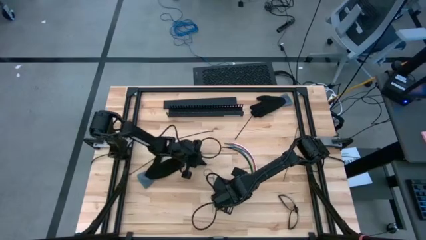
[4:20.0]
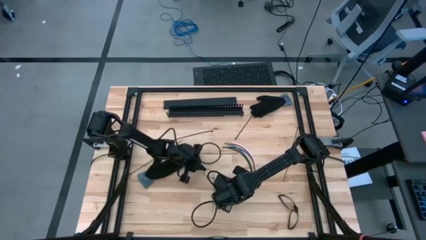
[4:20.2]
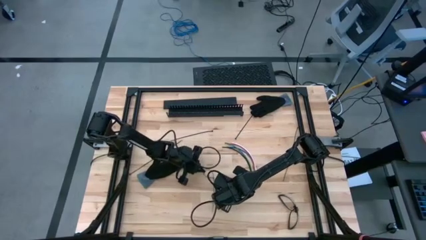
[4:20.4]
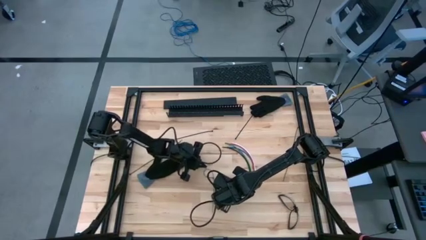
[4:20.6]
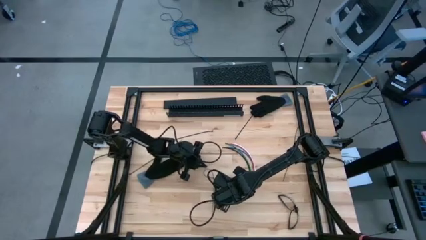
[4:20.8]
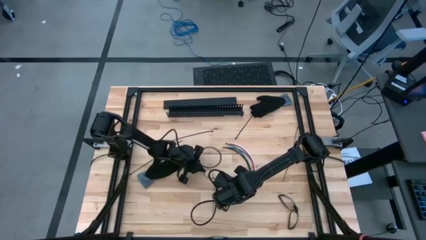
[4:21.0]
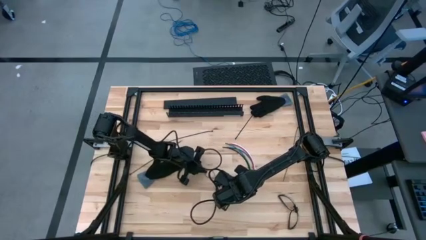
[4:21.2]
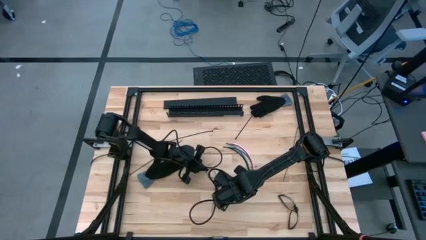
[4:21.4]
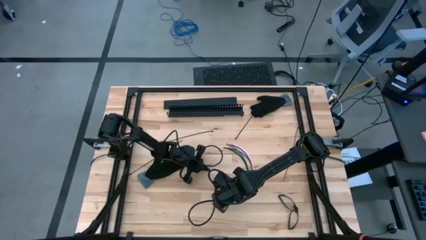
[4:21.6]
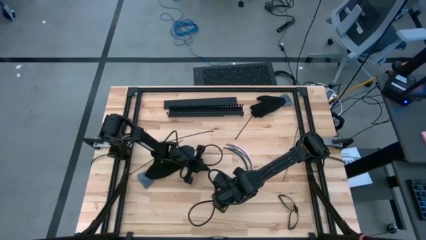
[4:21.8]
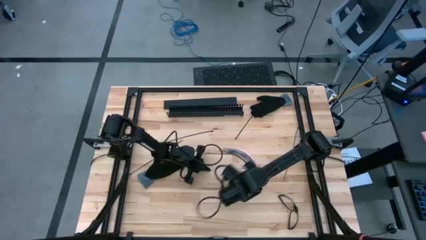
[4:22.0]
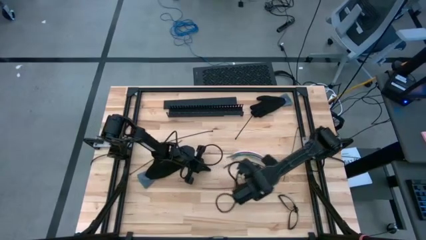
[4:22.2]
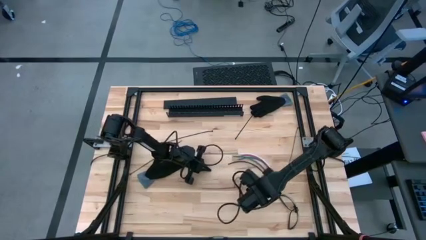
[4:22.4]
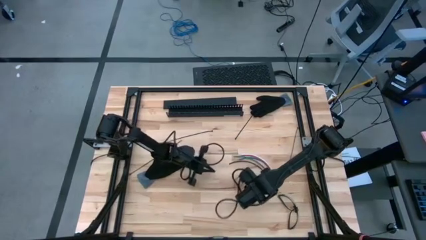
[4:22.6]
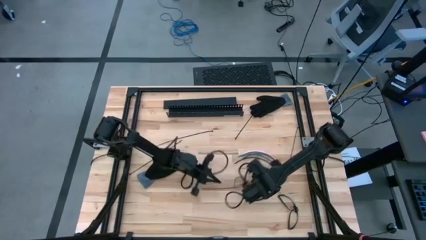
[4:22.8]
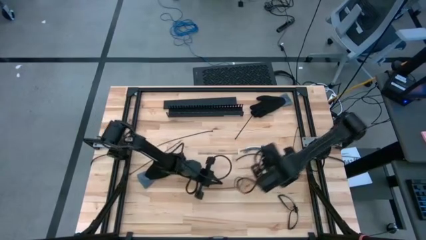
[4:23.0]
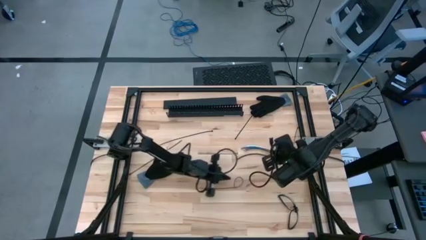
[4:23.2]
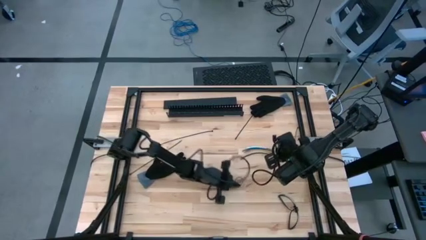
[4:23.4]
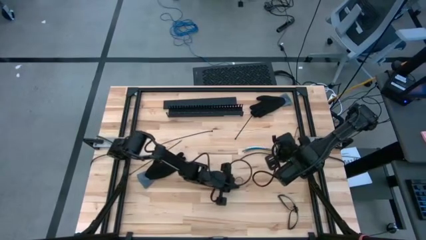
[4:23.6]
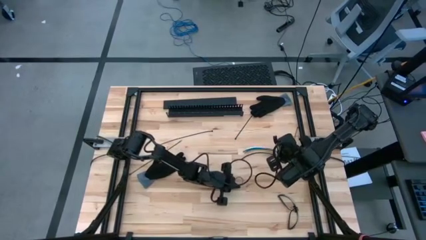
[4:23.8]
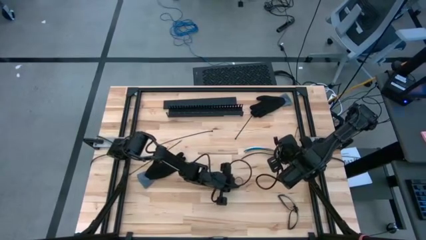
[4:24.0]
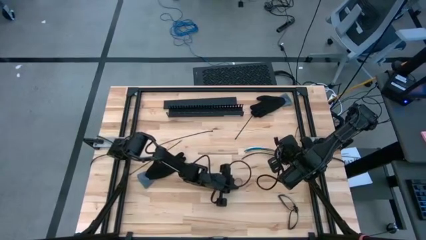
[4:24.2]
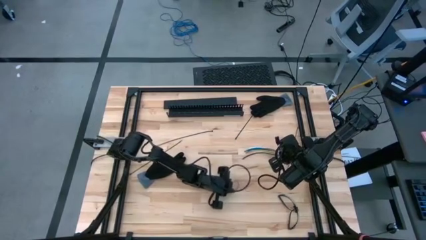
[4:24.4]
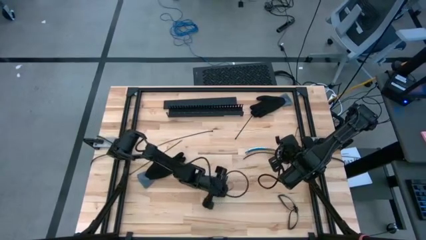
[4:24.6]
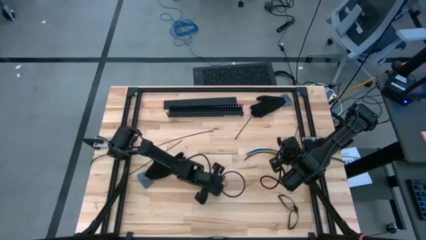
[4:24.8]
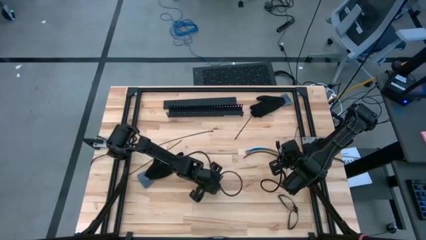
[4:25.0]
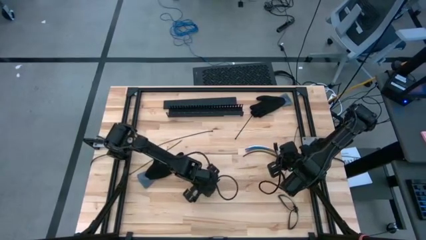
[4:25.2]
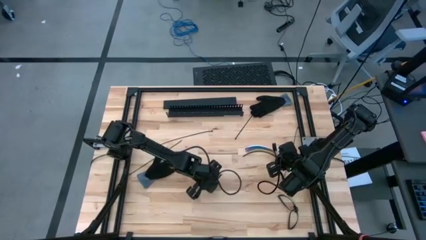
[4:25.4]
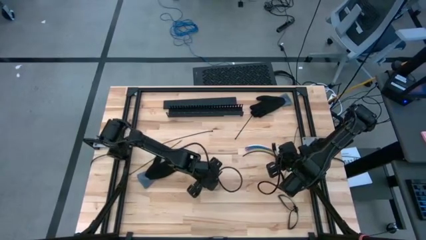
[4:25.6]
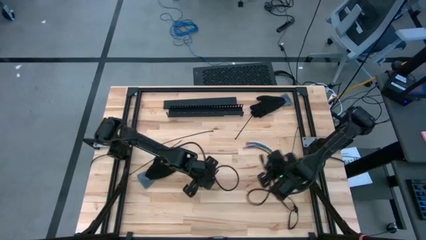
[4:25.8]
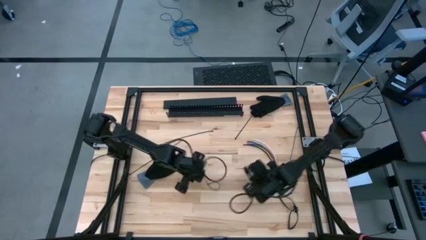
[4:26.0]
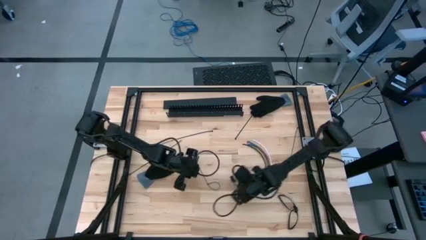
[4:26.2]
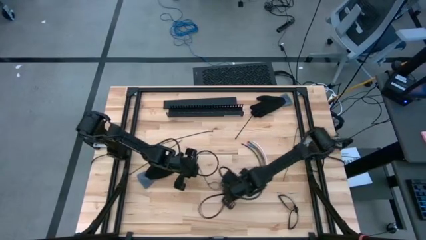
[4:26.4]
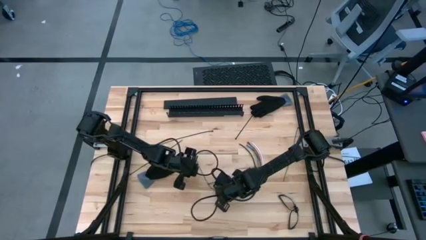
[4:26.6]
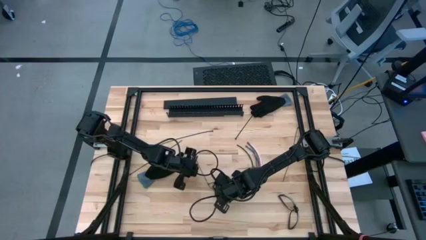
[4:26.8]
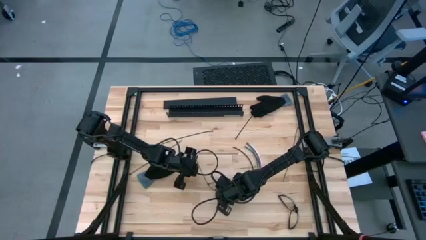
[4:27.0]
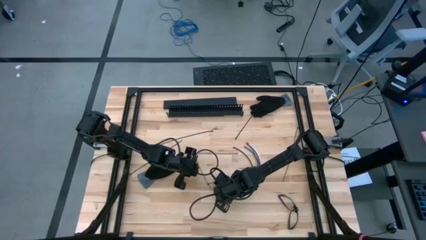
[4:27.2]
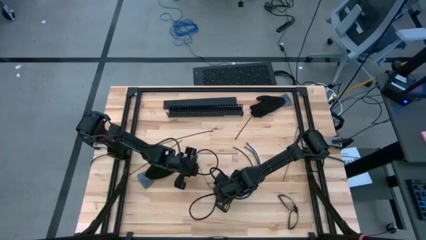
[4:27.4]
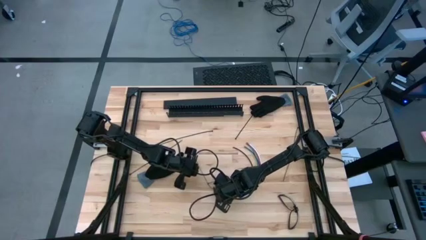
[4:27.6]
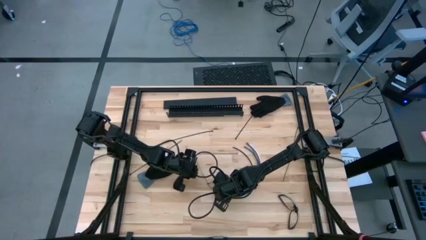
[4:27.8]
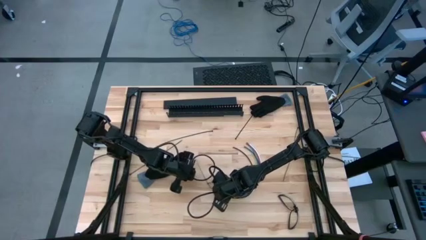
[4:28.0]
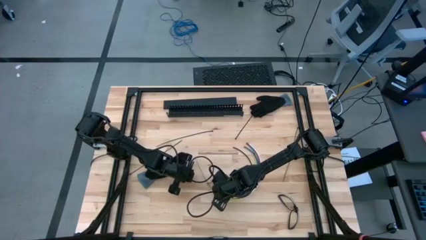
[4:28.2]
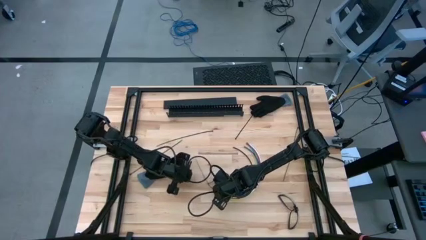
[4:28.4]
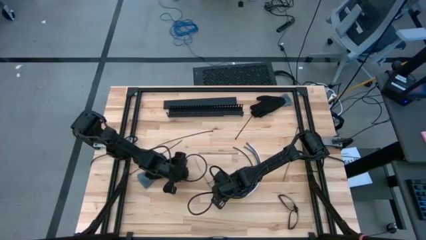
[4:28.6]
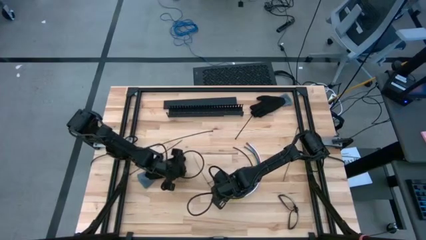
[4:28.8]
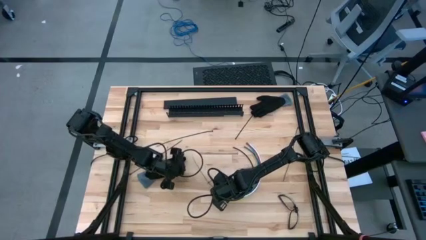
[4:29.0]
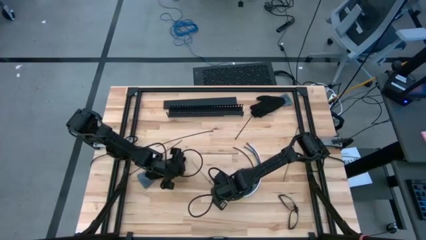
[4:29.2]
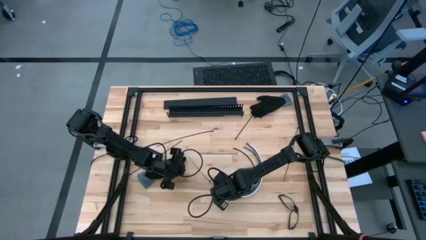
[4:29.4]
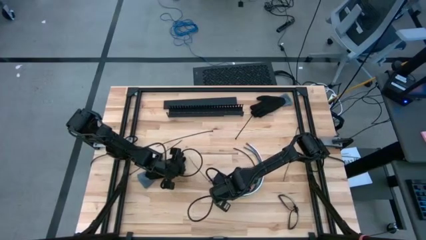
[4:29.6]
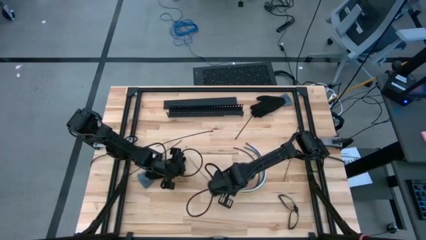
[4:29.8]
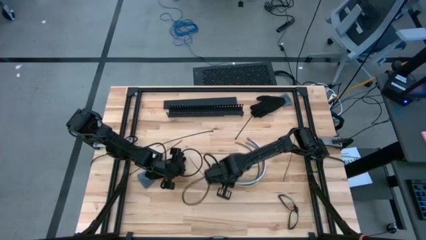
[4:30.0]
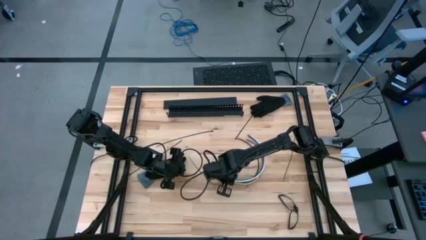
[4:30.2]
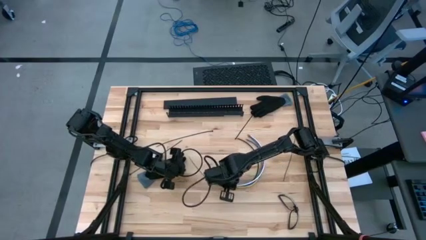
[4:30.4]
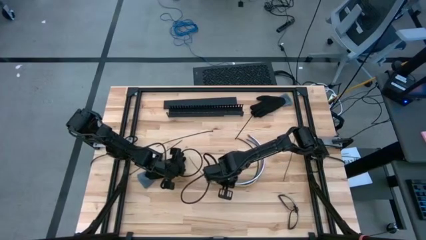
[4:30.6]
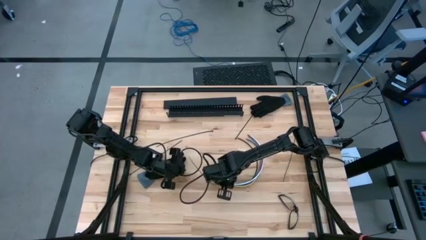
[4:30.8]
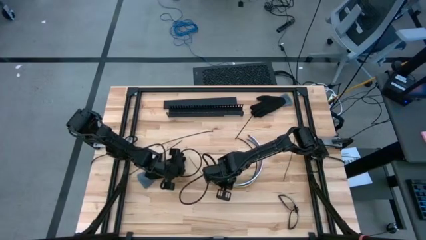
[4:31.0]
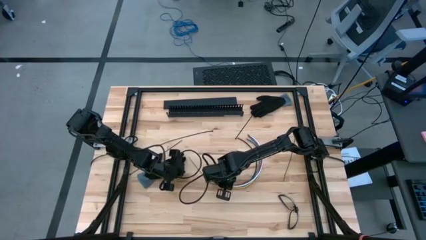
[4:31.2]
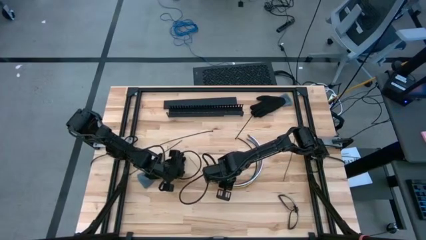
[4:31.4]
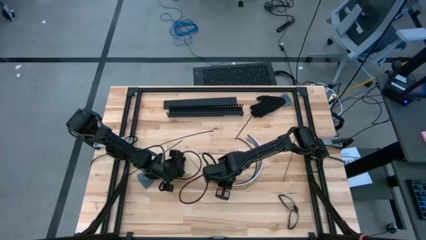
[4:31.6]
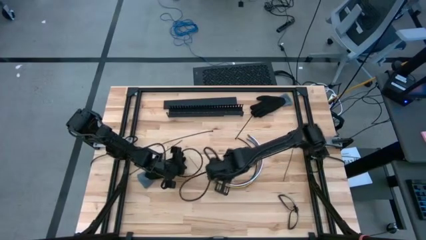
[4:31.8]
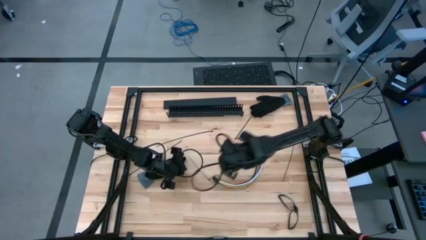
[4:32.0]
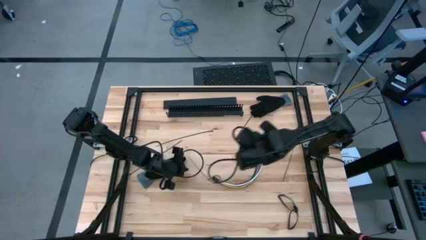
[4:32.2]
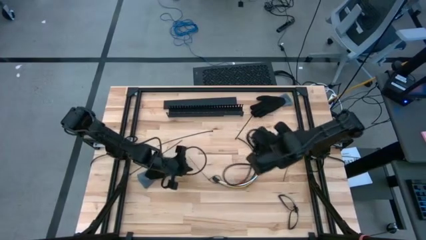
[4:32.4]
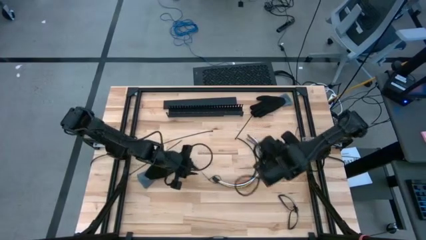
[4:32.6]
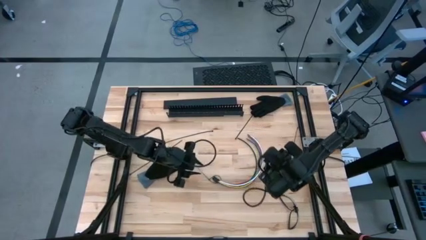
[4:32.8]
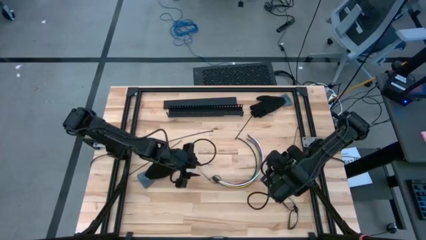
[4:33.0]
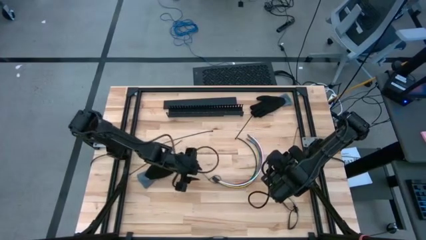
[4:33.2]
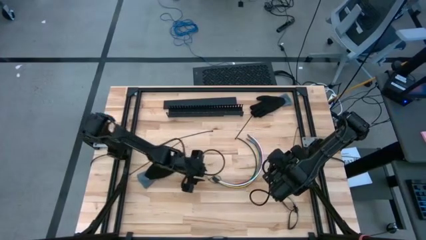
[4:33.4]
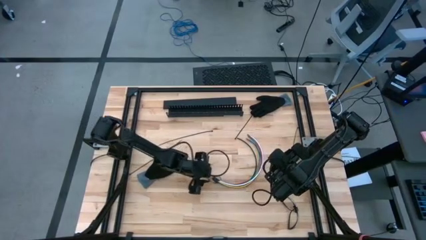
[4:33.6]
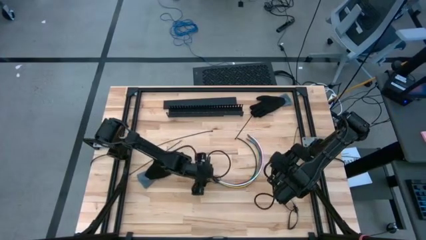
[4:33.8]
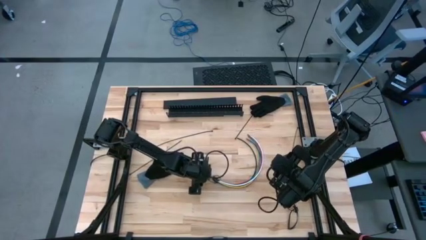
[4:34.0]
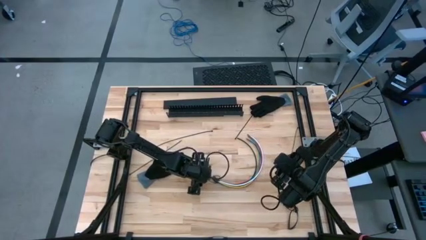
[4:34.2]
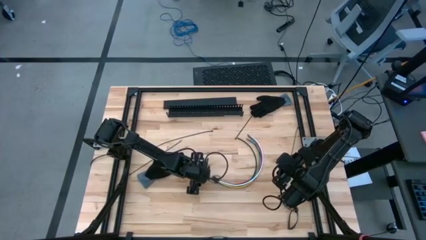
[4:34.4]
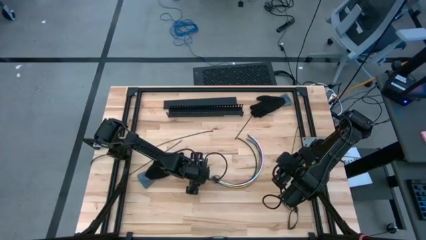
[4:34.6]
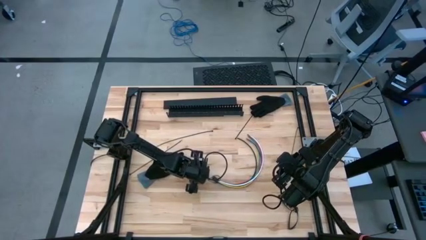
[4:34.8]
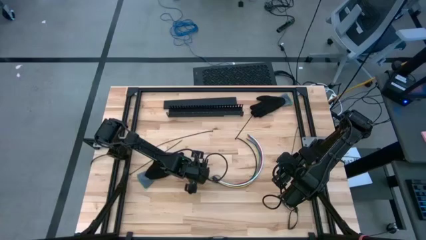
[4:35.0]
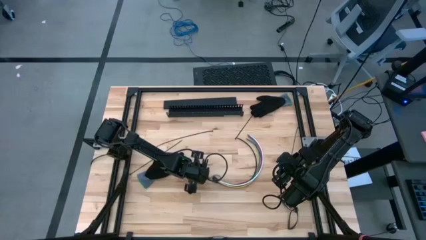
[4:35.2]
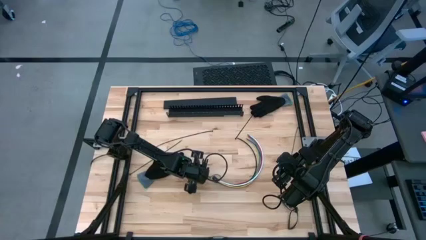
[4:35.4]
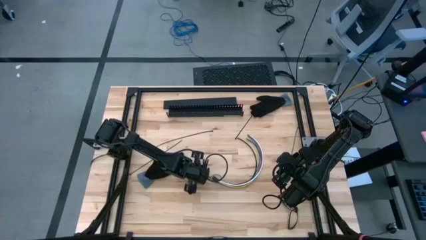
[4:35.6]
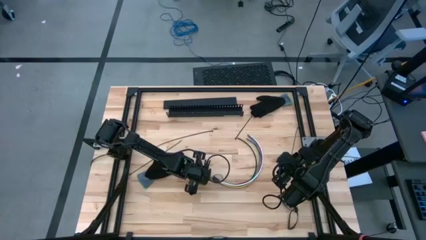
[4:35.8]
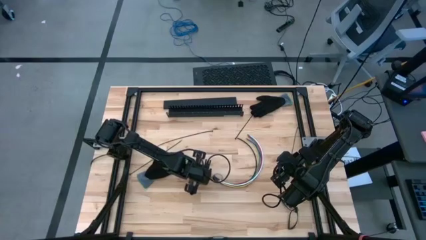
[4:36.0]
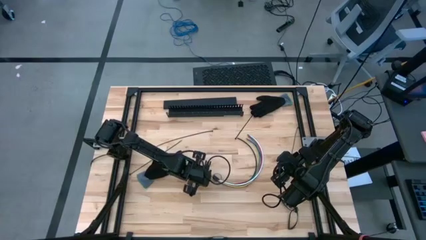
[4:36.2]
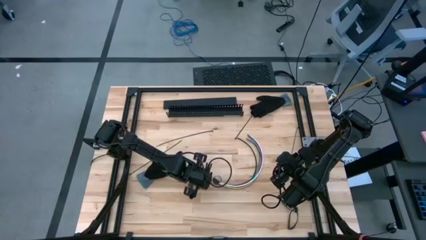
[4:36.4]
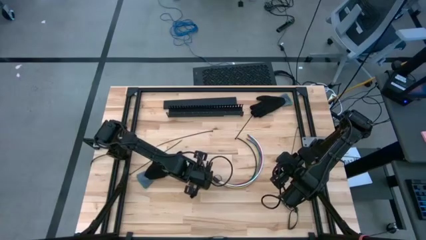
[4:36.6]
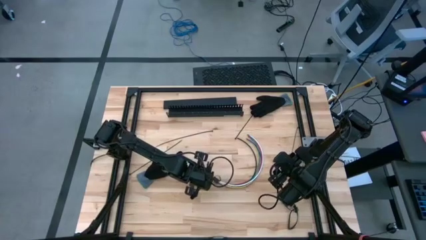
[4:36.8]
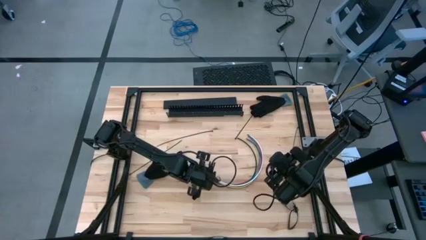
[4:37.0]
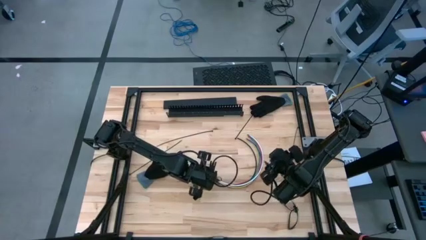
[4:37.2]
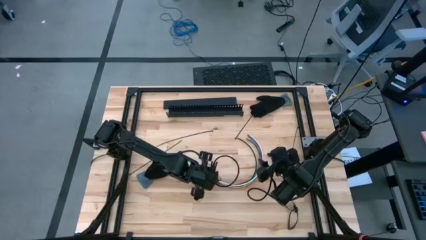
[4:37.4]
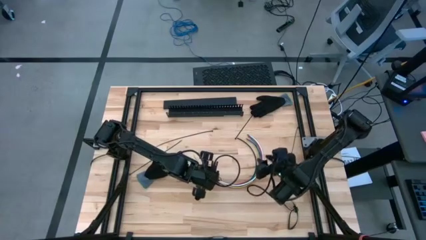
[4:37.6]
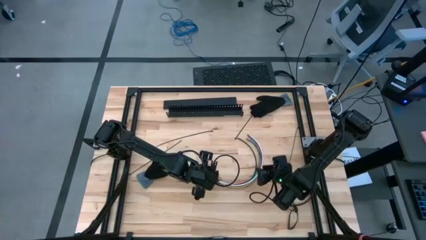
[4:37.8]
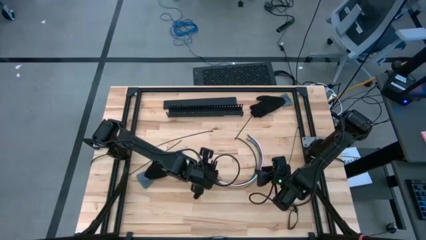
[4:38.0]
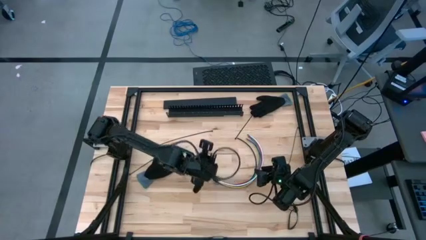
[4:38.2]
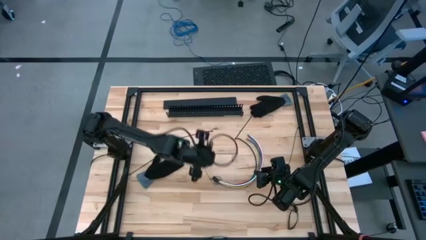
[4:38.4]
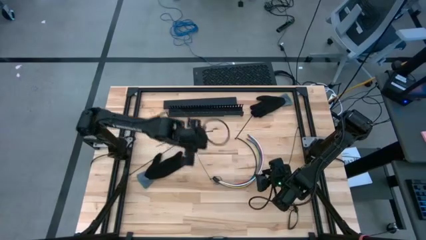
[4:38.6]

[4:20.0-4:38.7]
Task: Ziptie cables
Wrap the cable wires using a zip tie
